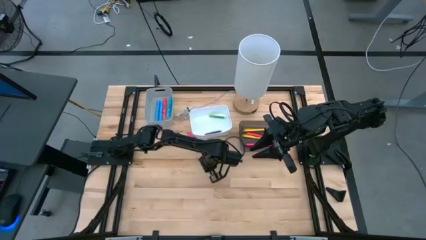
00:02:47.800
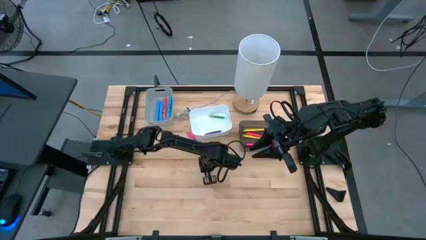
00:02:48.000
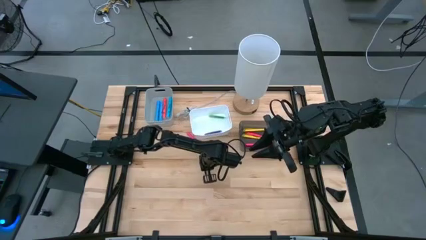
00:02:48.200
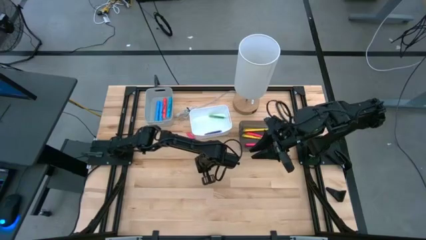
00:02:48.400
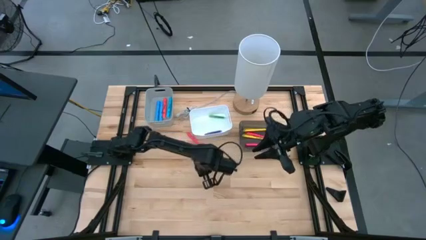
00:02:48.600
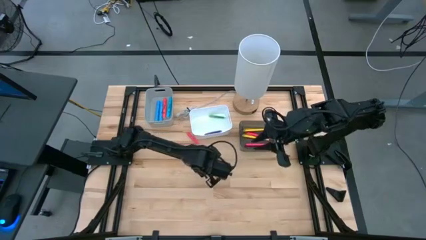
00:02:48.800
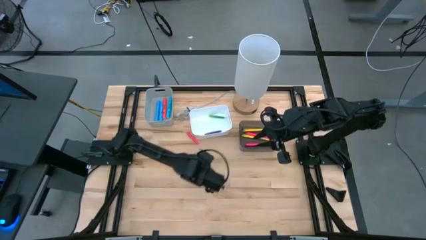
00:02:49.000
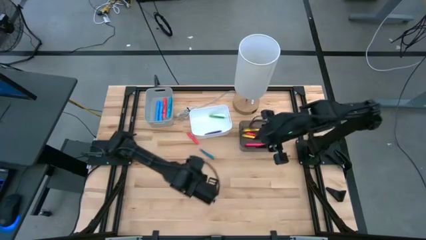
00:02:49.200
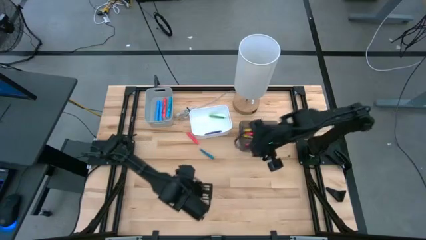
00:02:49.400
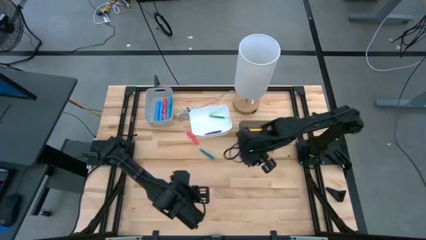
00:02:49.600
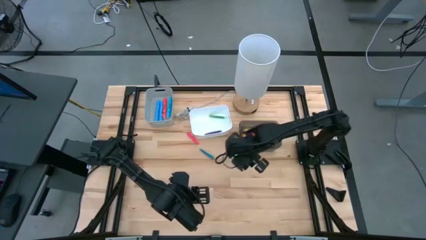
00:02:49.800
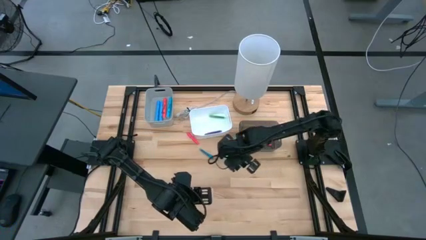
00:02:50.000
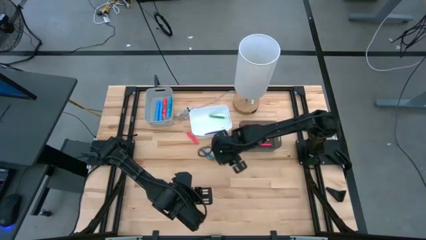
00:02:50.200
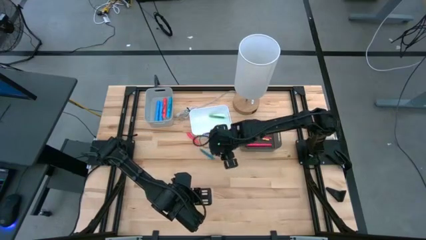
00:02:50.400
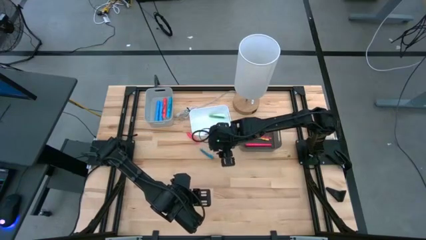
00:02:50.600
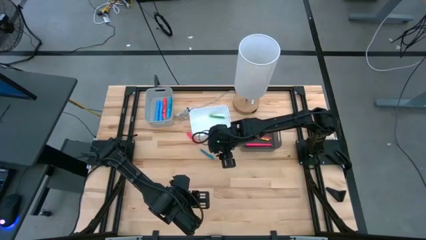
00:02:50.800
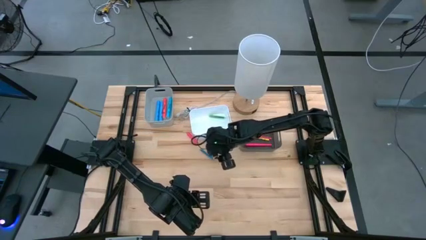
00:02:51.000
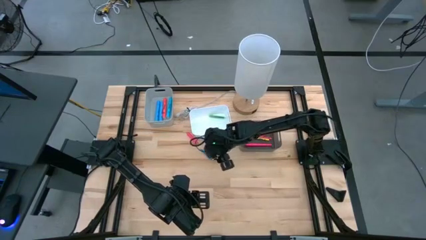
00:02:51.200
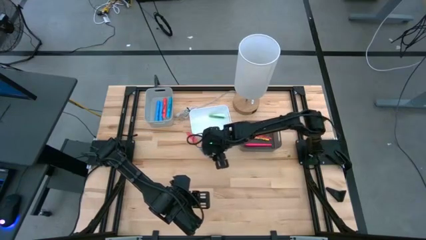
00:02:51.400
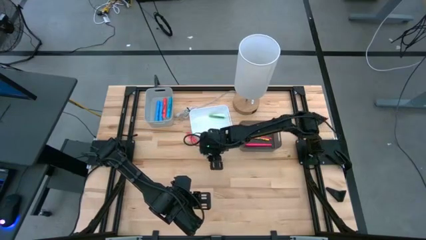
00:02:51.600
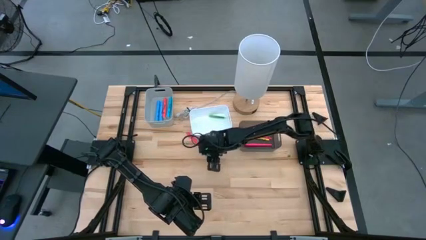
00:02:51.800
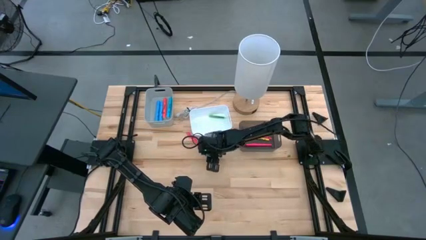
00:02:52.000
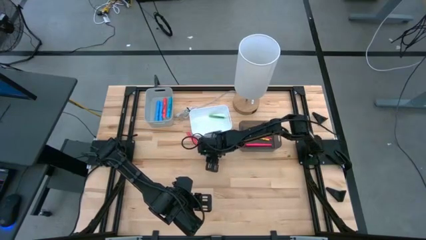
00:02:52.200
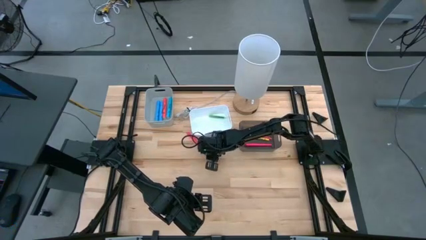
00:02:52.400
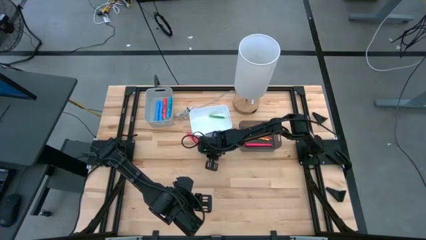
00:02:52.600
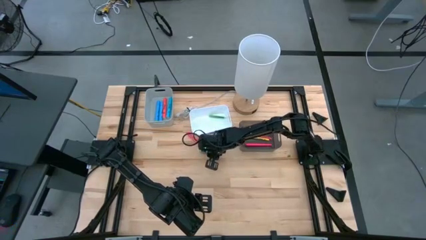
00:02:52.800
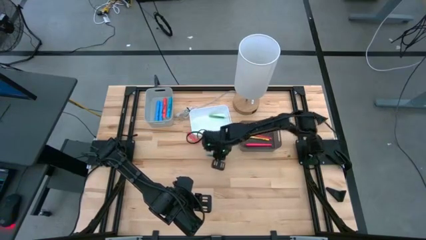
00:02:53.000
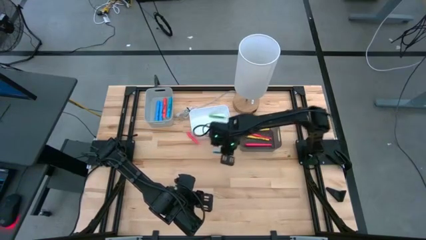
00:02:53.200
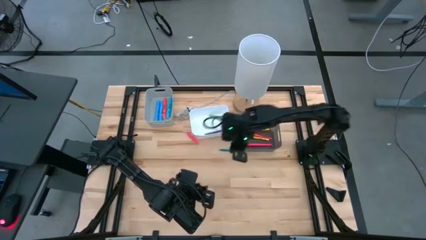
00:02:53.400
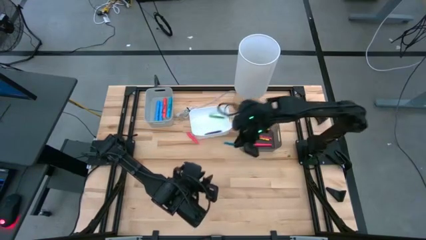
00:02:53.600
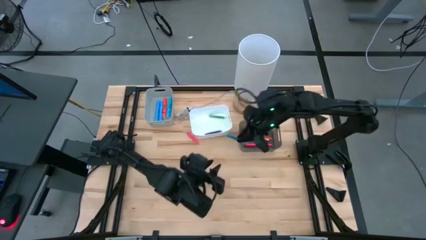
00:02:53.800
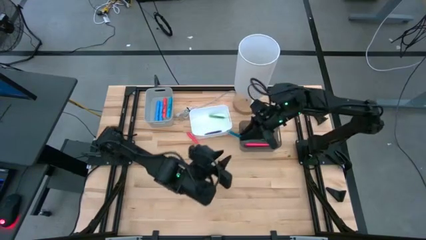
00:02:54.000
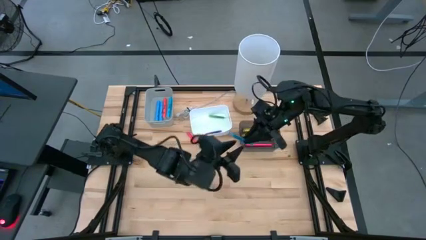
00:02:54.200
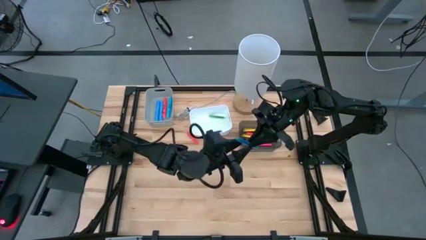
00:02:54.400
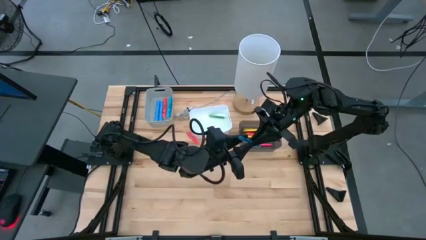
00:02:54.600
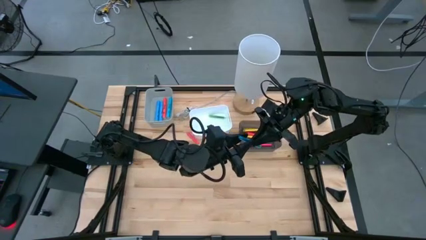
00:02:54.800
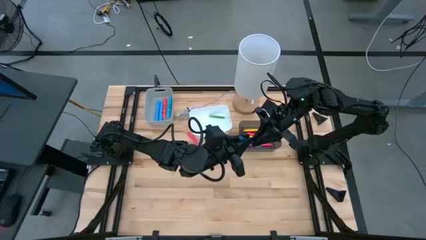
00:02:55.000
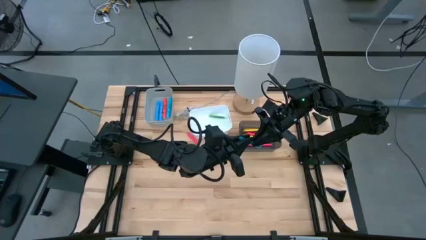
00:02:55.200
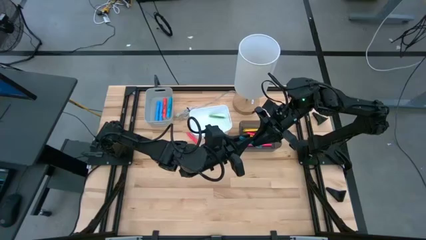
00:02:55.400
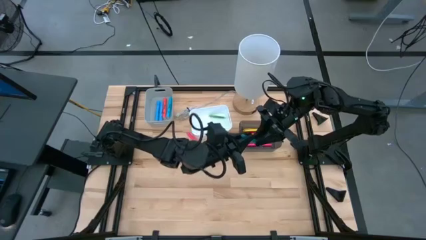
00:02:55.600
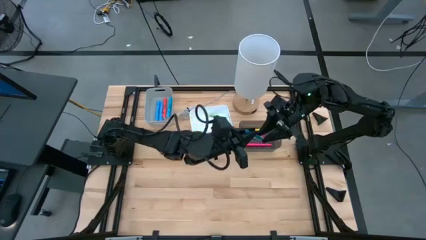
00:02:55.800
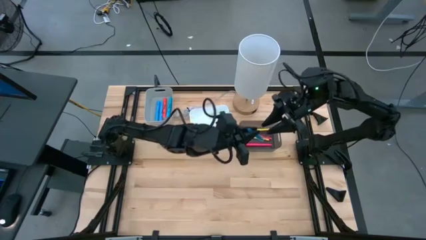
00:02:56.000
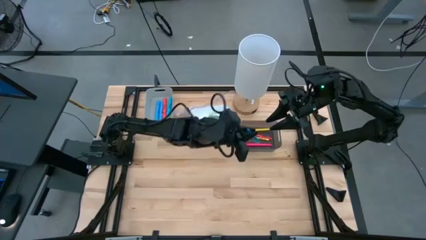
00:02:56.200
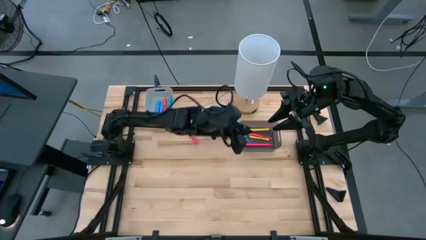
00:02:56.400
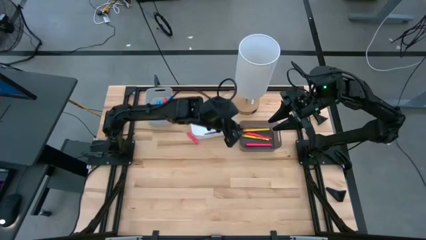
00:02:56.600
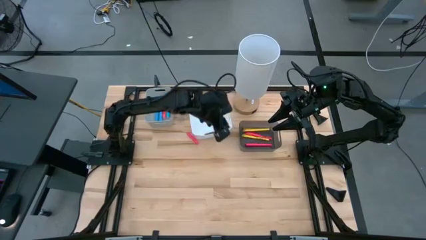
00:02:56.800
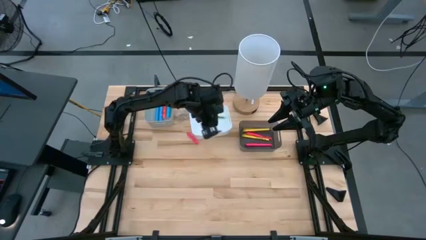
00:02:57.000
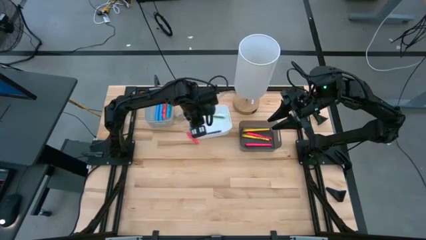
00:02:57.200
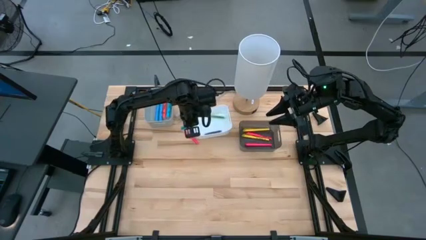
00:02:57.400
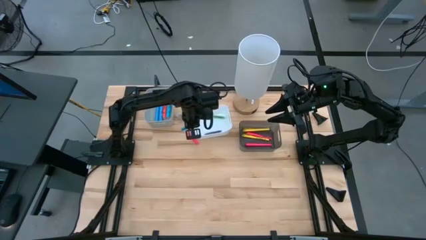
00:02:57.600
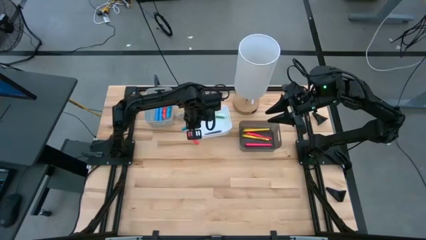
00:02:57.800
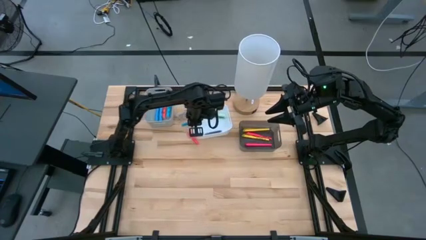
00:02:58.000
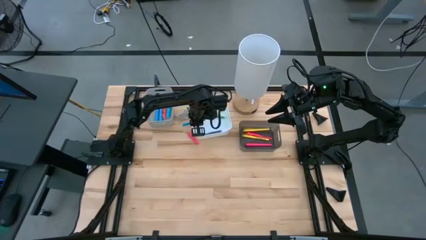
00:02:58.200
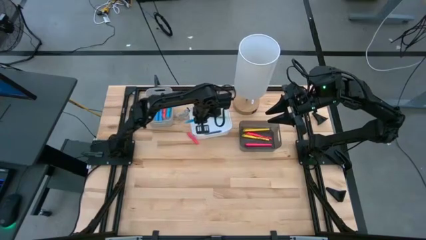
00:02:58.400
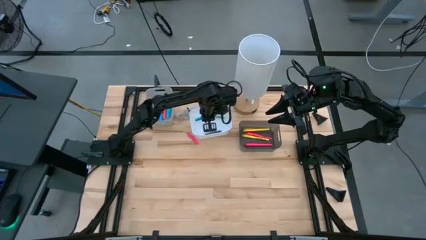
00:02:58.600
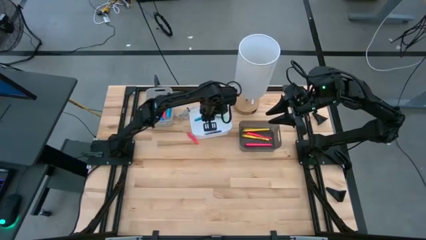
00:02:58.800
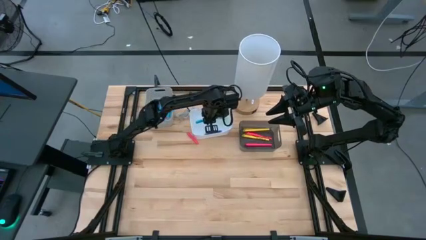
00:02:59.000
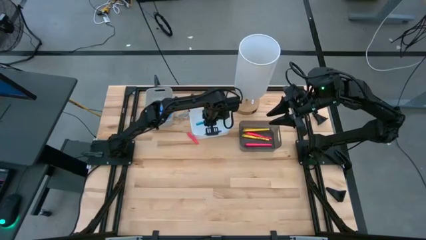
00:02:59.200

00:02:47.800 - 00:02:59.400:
Task: Pick & Place Markers
Put the transparent blue pen into the white bin

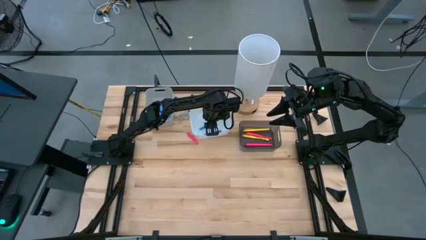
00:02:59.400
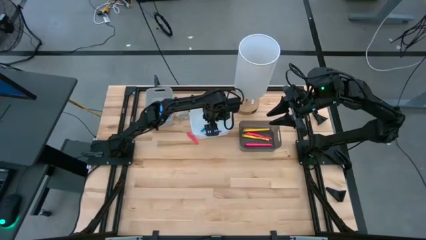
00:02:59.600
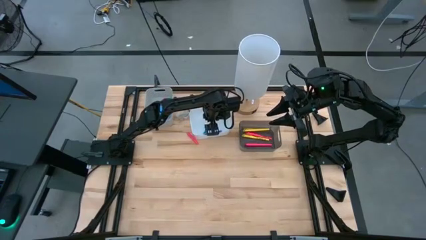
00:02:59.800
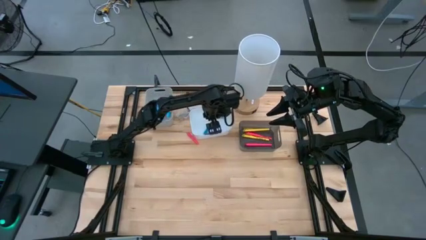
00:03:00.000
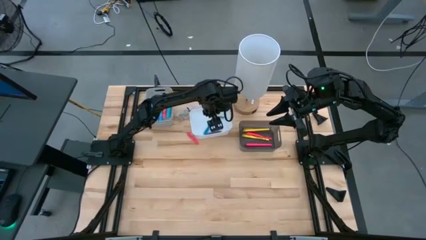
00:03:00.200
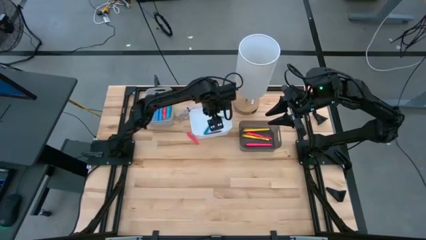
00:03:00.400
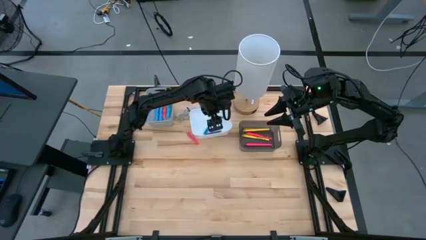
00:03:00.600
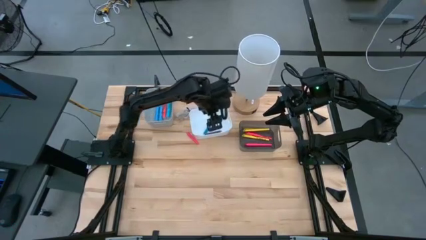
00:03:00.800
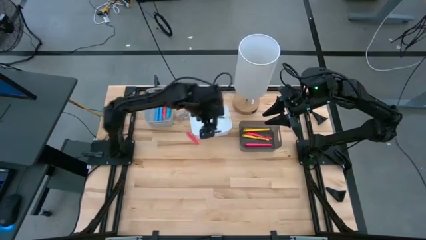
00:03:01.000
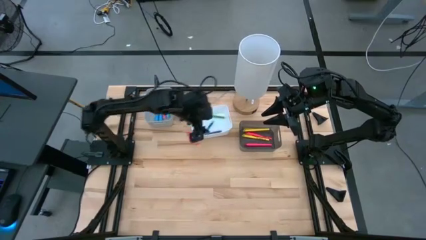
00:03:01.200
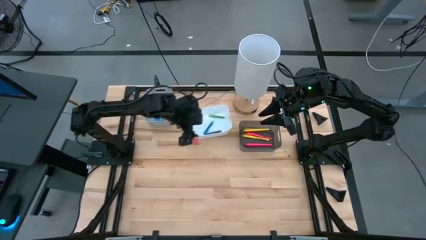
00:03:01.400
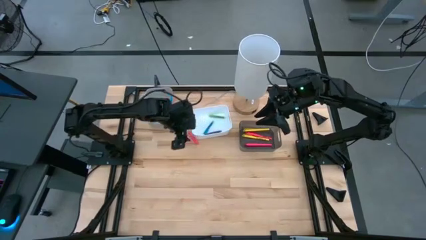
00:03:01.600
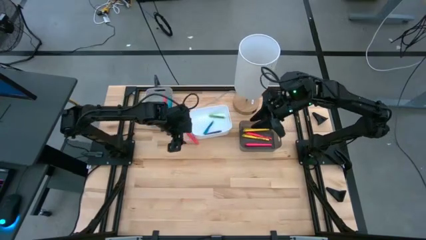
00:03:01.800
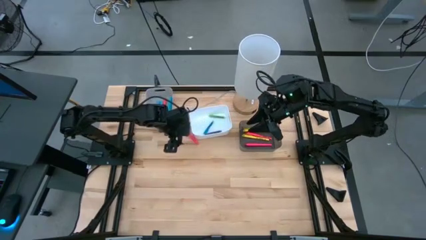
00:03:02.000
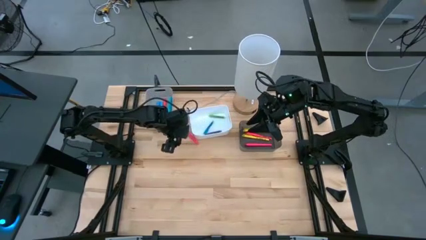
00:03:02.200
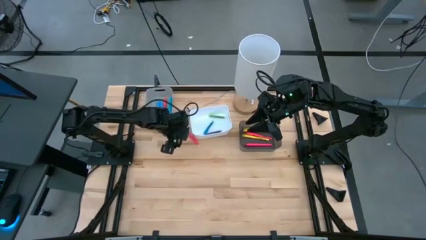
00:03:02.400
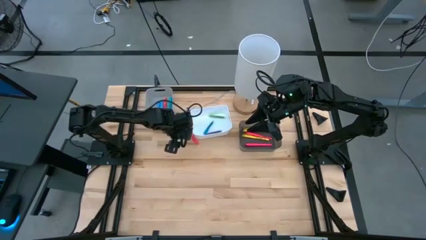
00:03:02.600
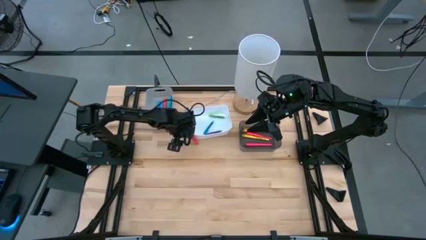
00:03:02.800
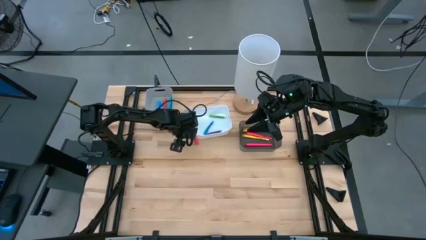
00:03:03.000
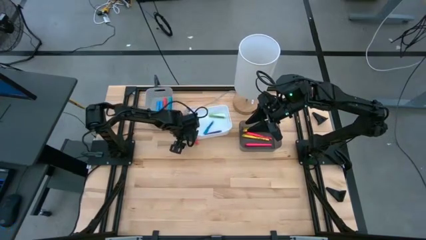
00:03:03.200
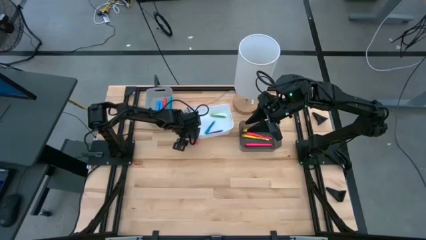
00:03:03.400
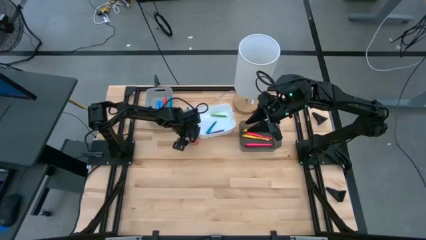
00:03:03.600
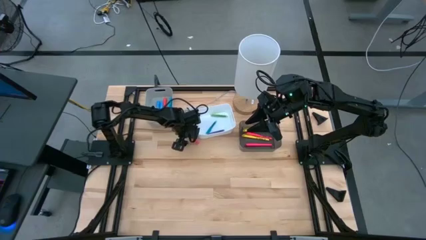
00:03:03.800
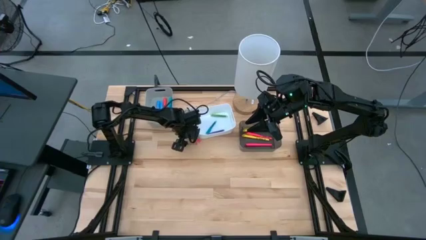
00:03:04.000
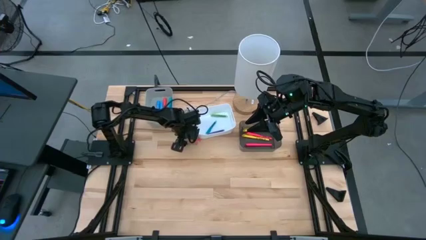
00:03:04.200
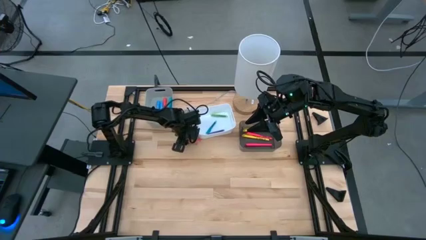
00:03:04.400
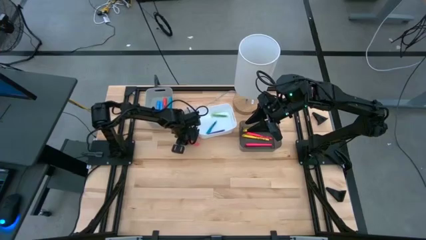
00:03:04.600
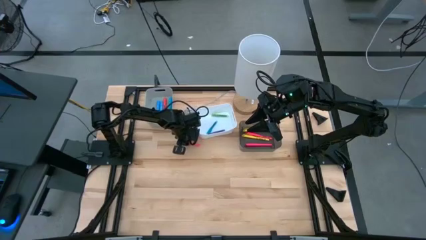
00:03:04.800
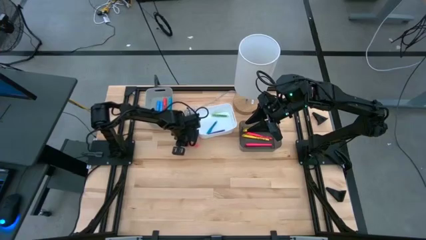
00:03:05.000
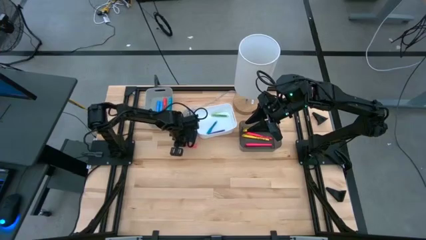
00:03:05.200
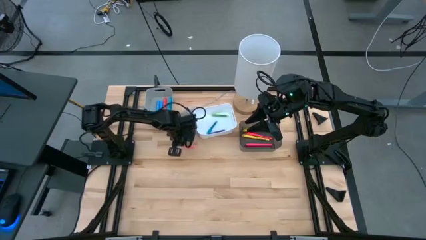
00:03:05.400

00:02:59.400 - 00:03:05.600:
Put the transparent pink pen into the white bin
